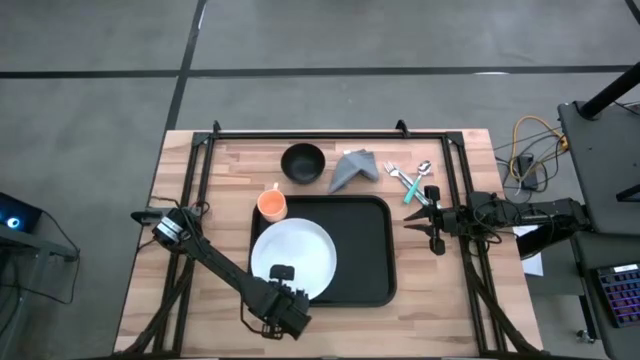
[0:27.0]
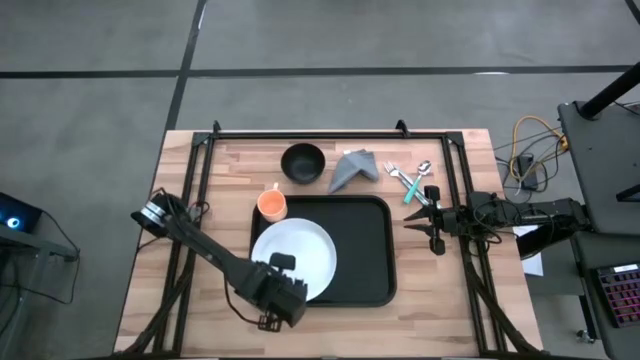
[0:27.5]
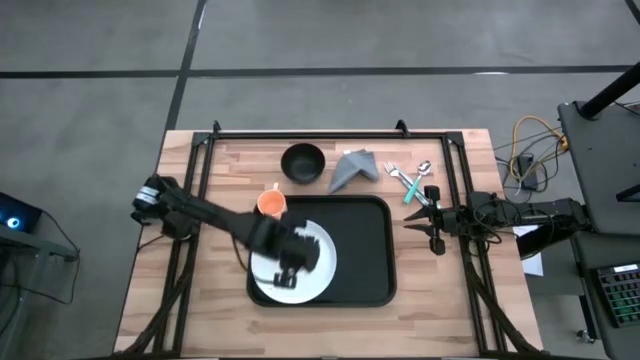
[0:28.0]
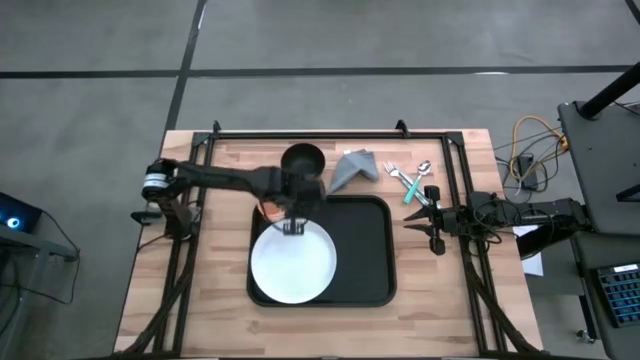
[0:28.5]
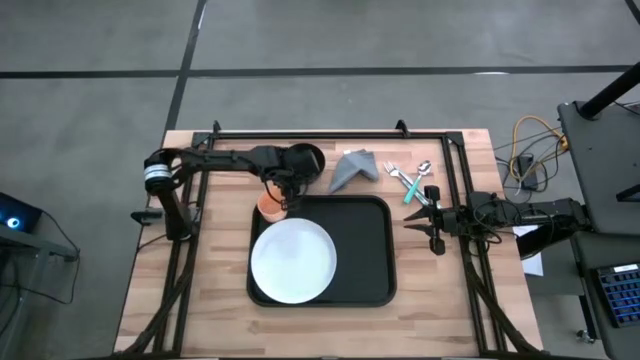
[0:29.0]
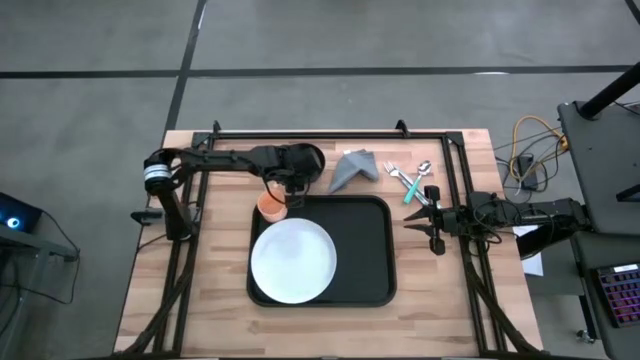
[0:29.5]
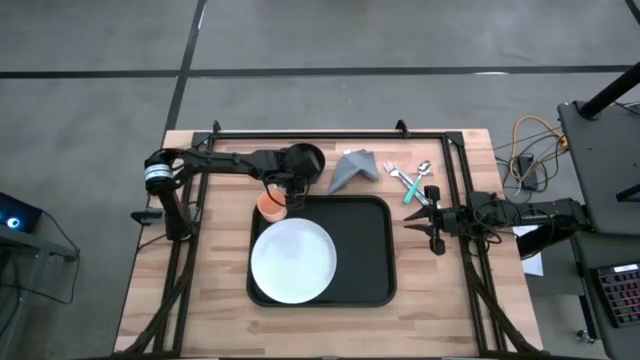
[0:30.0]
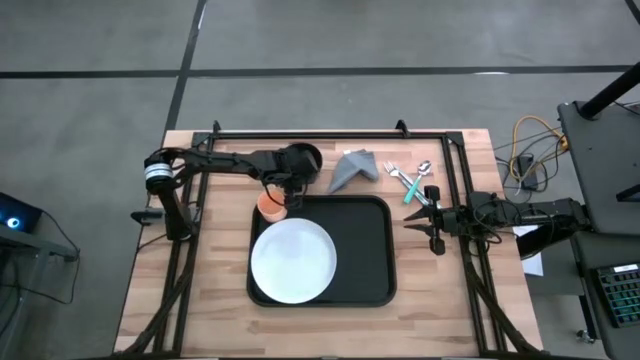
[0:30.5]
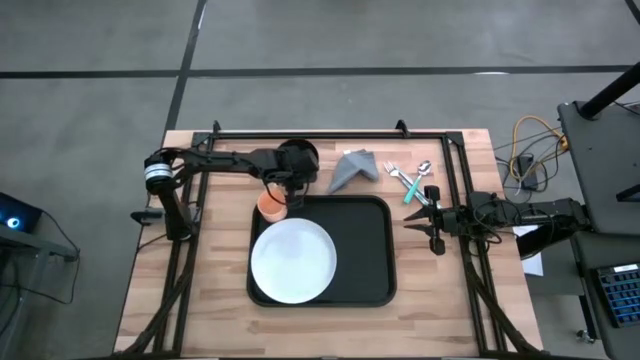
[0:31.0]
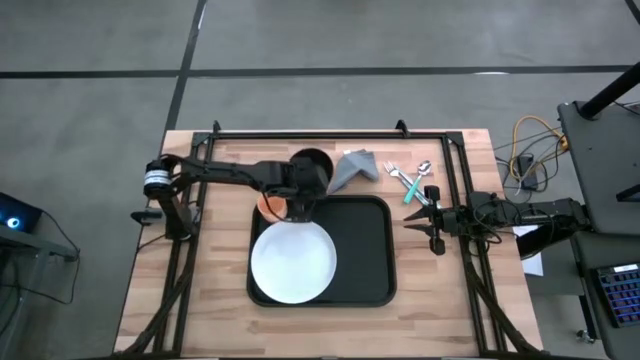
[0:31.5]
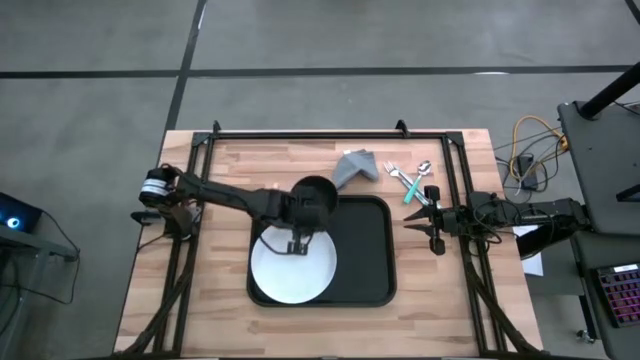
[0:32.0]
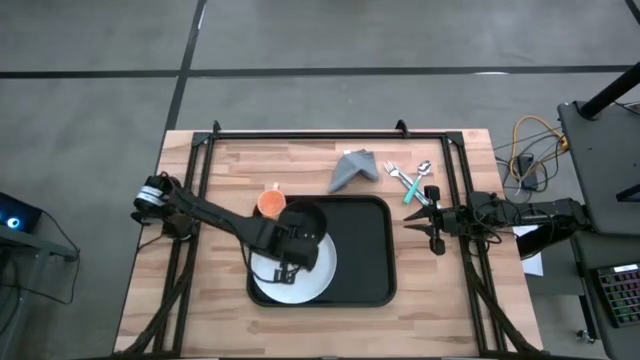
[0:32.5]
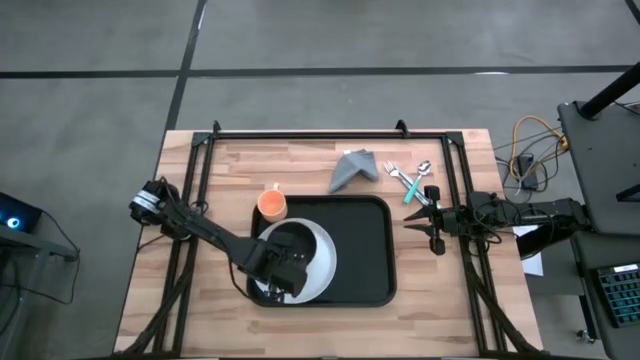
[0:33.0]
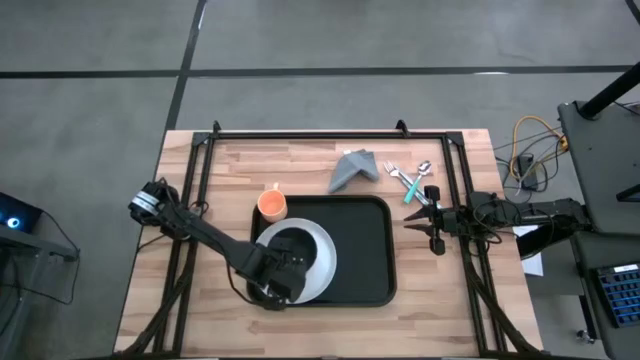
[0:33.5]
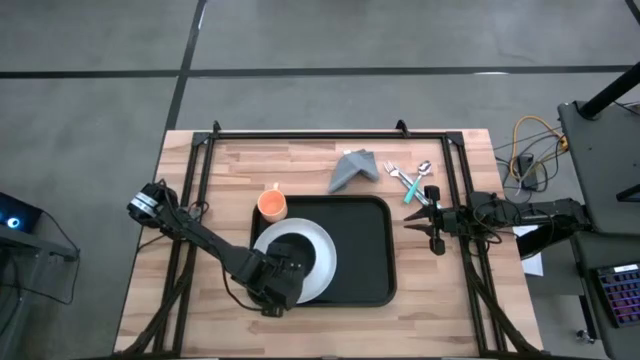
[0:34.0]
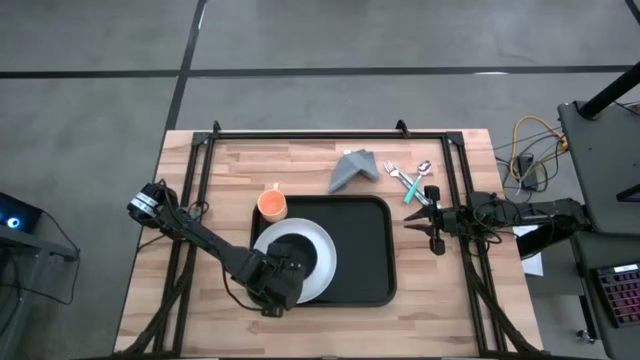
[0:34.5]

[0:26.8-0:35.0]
Task: Set up tray
Put the black bowl on top of the white plate

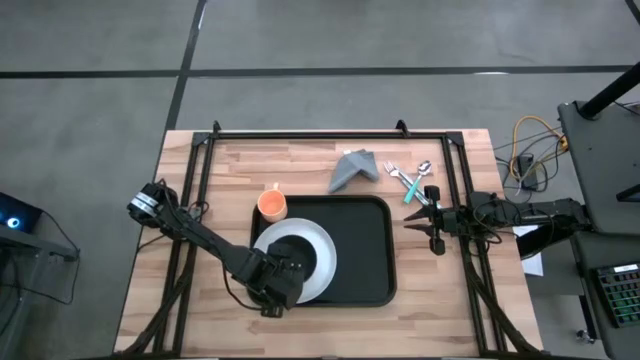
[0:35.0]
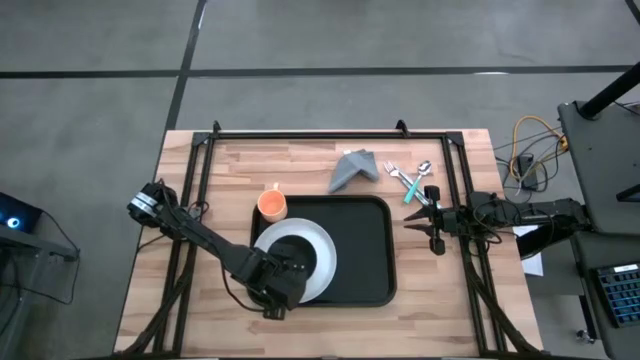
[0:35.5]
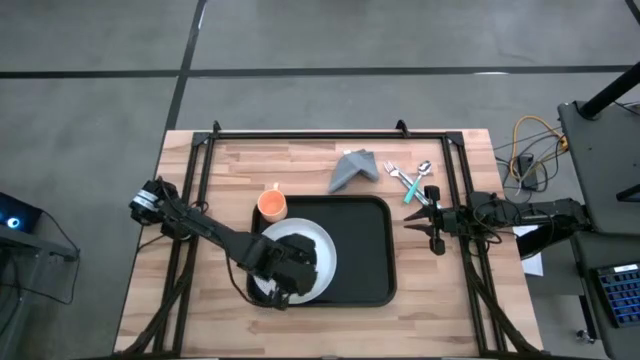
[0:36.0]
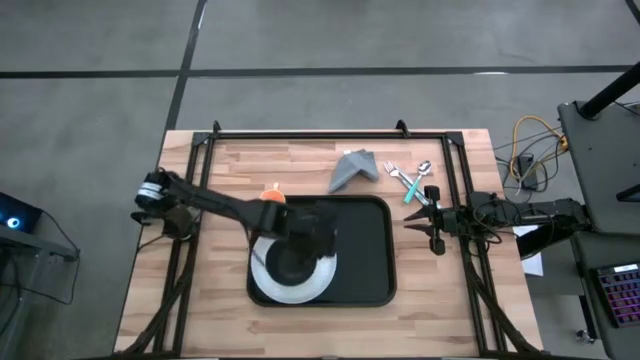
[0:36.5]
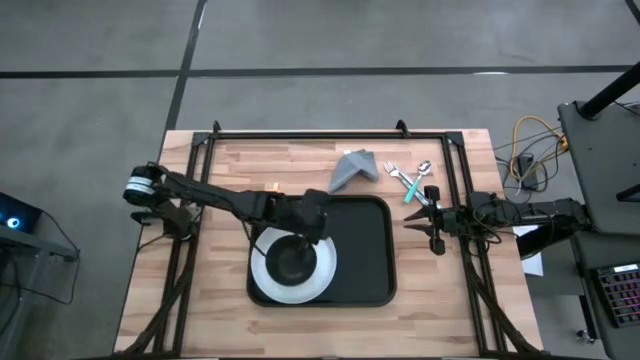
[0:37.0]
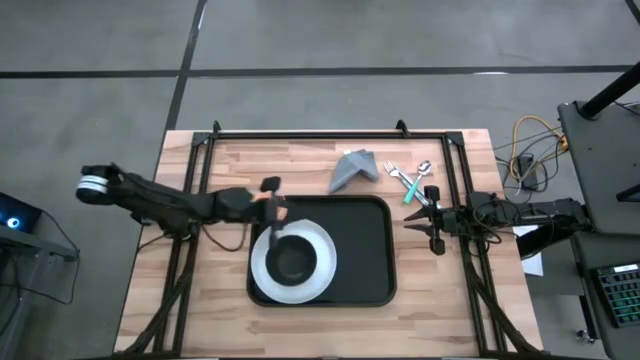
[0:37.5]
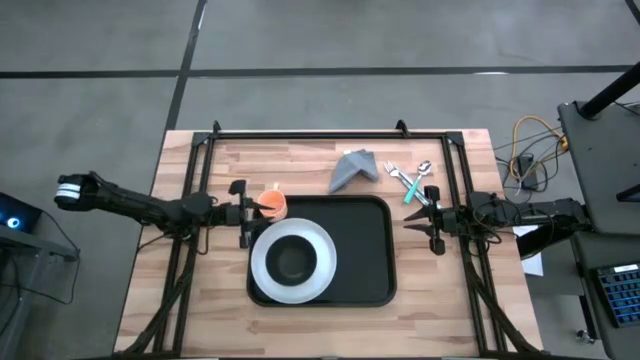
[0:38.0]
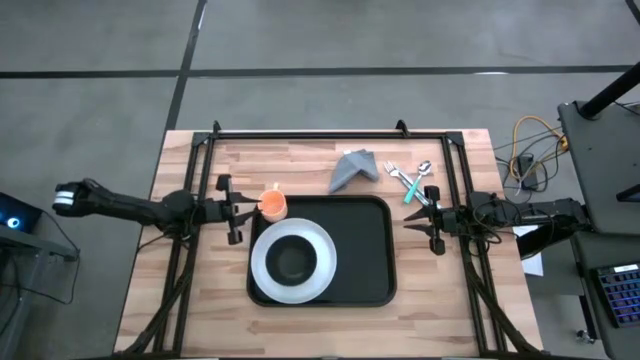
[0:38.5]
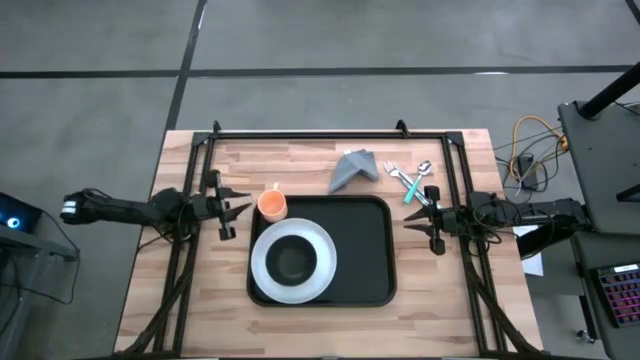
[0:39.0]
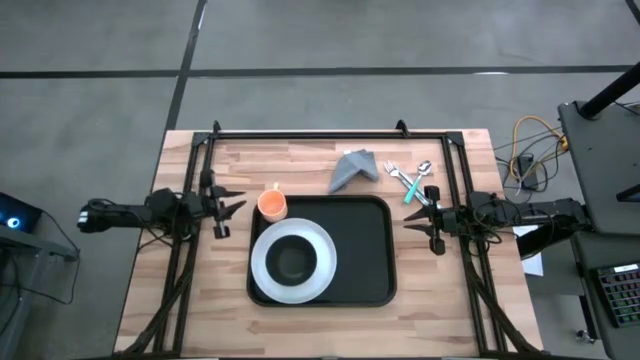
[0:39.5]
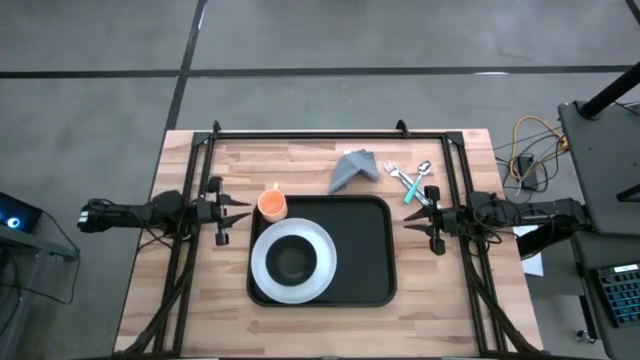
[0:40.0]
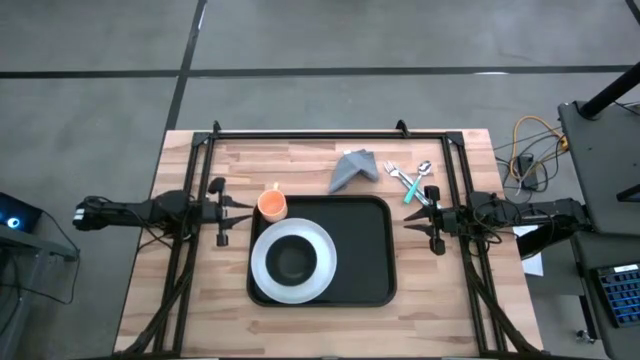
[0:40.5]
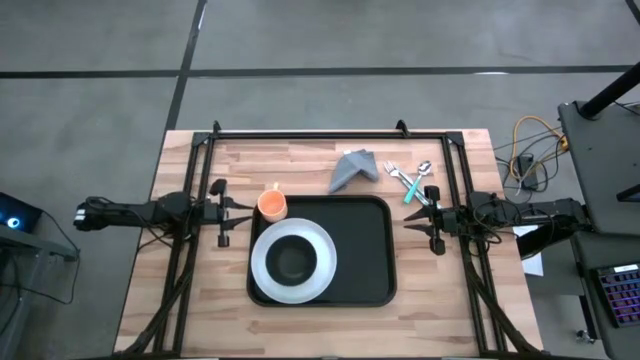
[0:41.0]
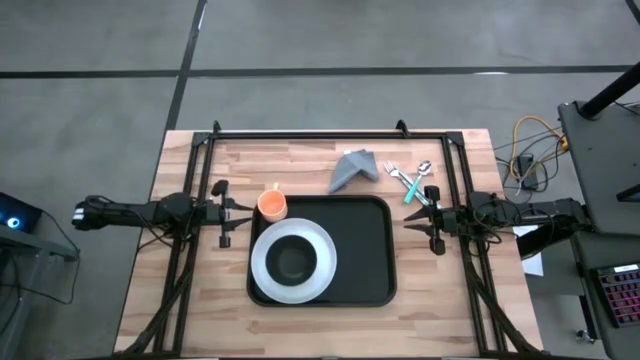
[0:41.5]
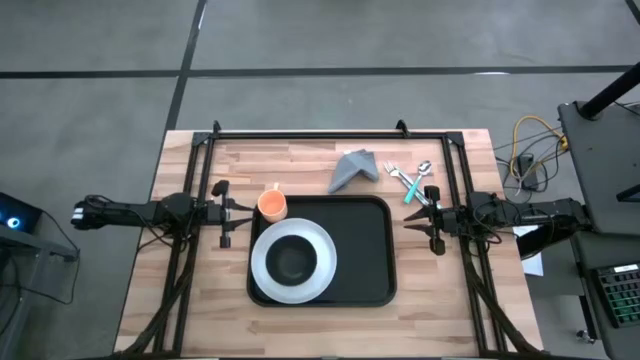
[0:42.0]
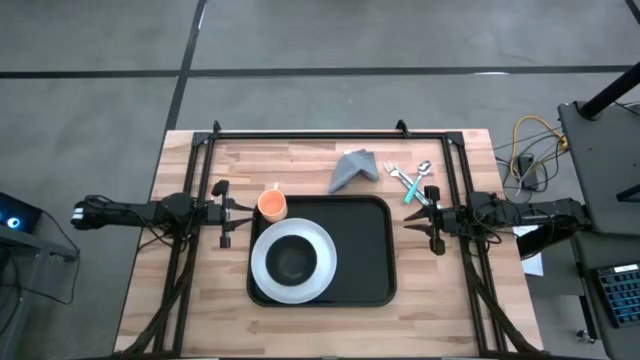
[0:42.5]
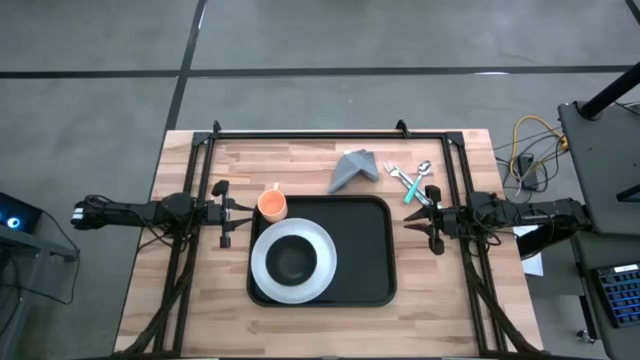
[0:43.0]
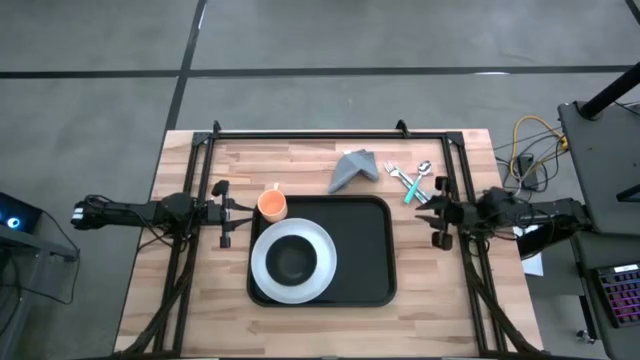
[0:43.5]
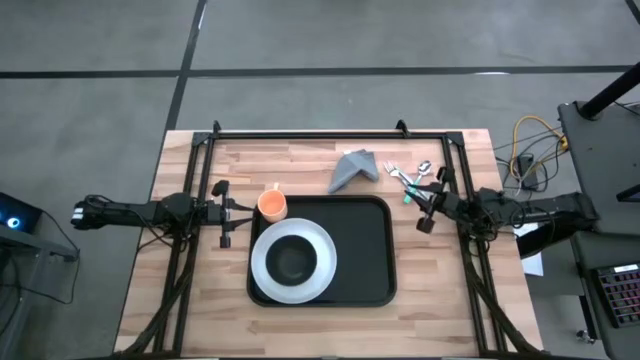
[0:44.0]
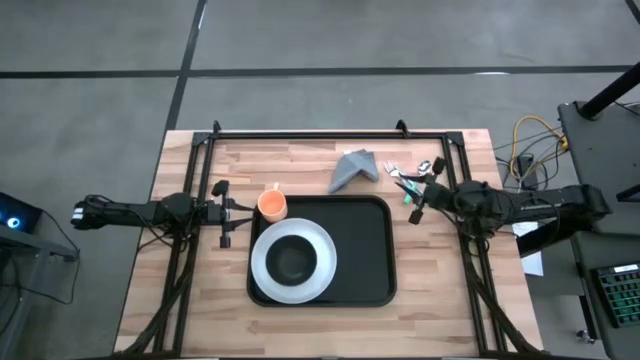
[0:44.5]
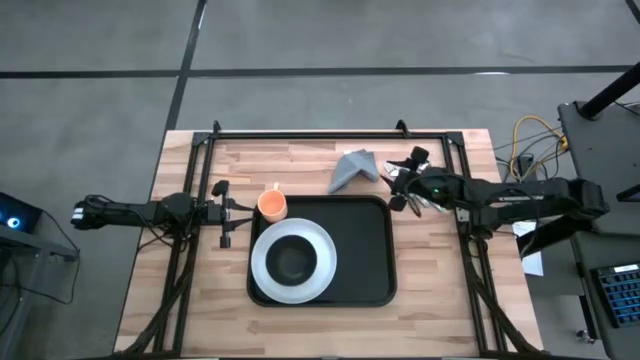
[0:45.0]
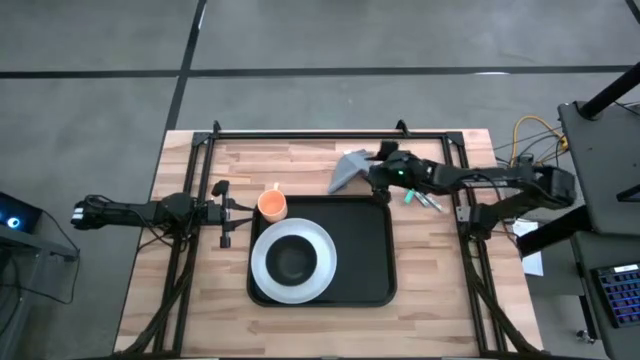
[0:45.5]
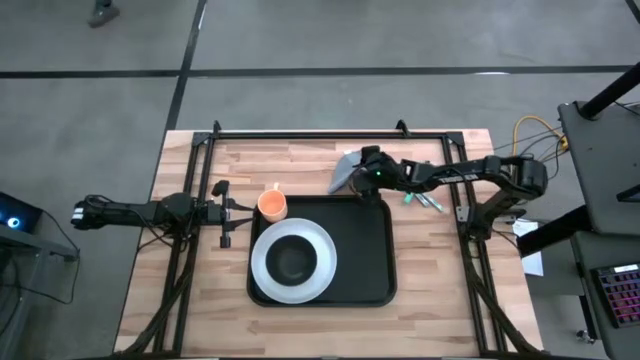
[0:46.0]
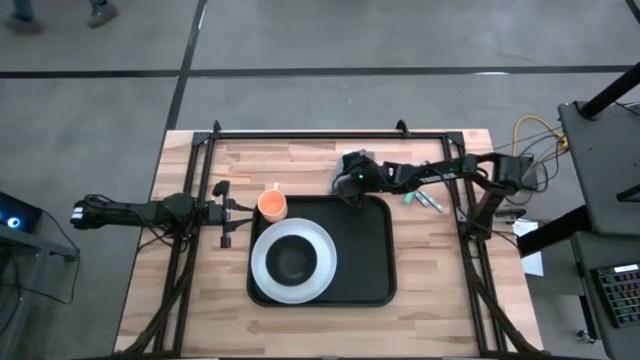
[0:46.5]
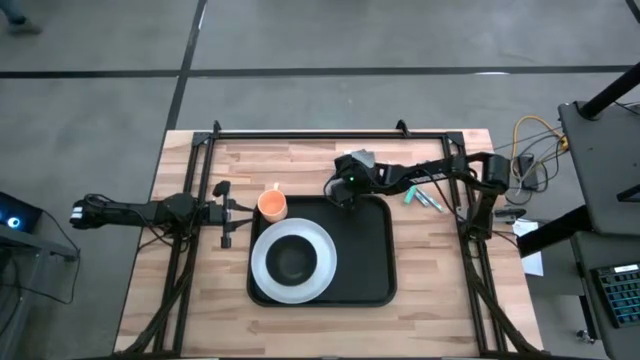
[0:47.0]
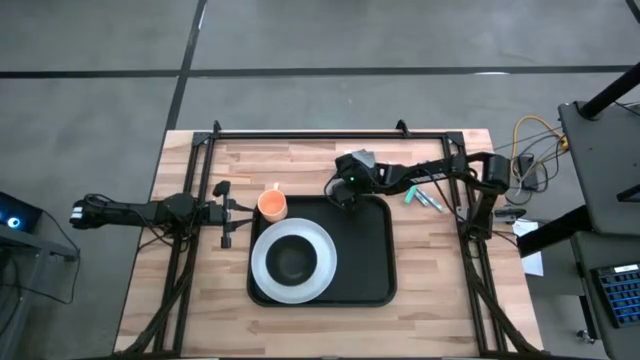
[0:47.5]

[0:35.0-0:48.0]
Put the gray napkin on the right side of the black tray
